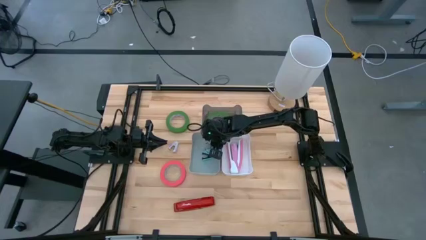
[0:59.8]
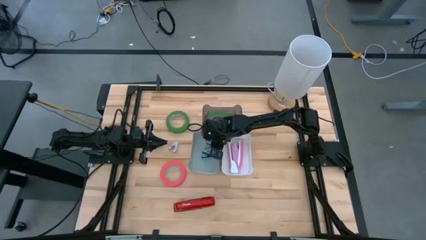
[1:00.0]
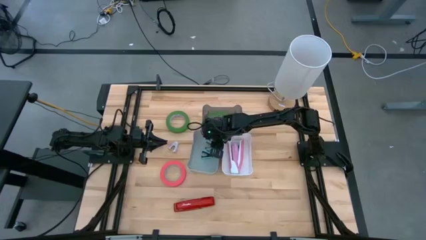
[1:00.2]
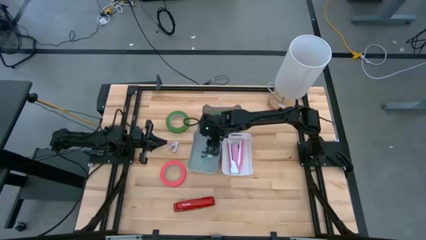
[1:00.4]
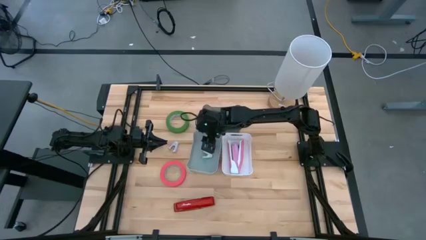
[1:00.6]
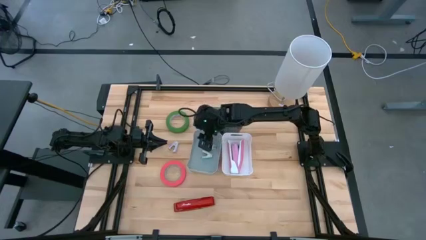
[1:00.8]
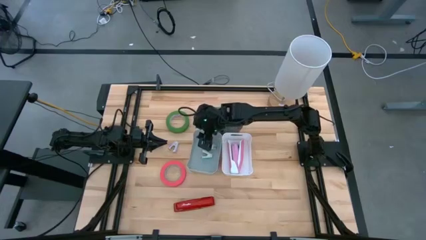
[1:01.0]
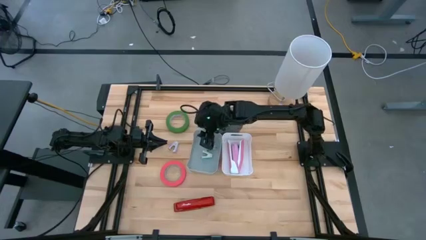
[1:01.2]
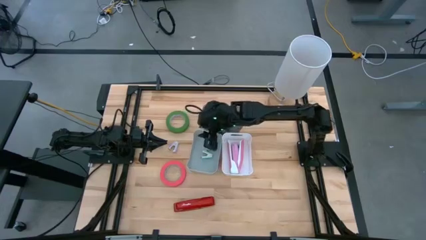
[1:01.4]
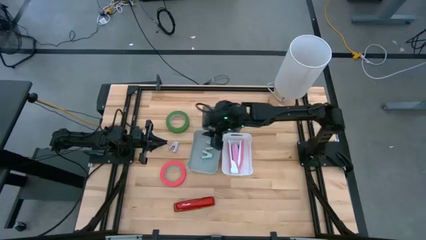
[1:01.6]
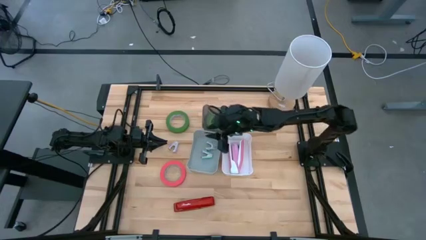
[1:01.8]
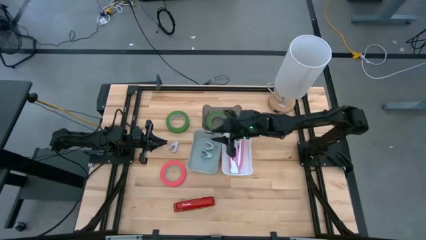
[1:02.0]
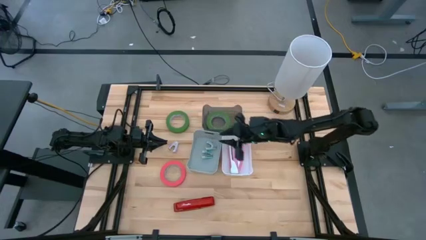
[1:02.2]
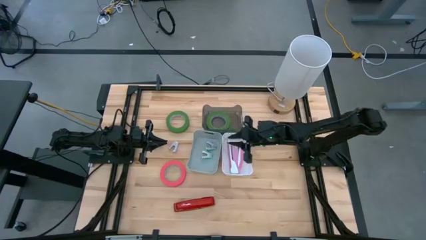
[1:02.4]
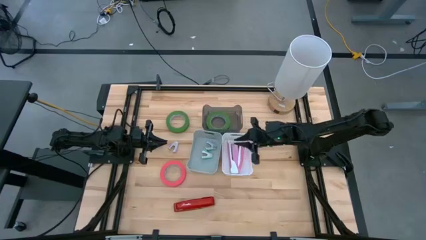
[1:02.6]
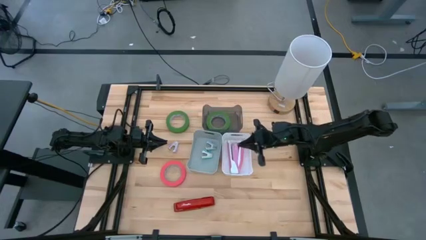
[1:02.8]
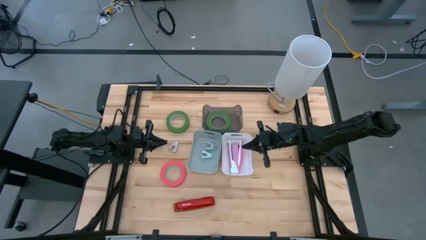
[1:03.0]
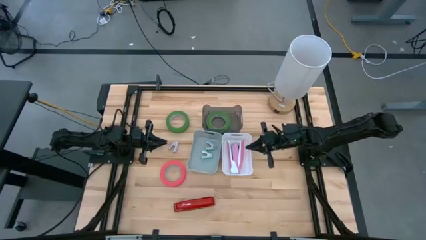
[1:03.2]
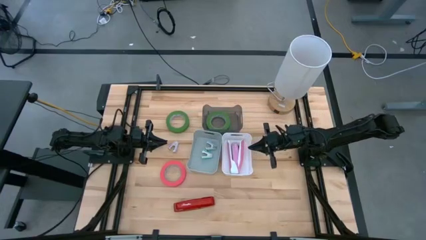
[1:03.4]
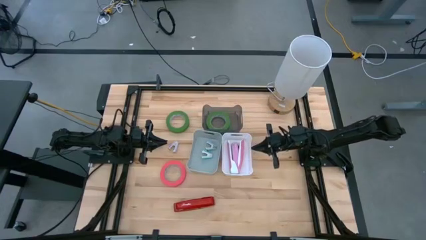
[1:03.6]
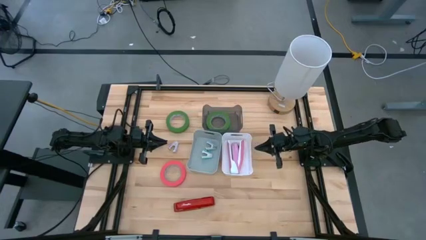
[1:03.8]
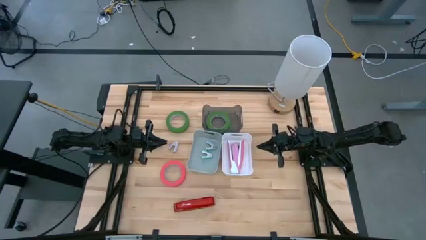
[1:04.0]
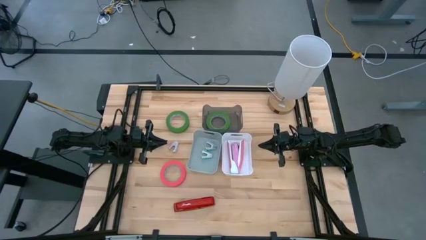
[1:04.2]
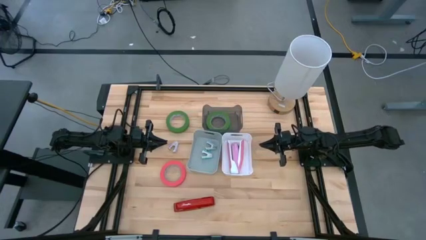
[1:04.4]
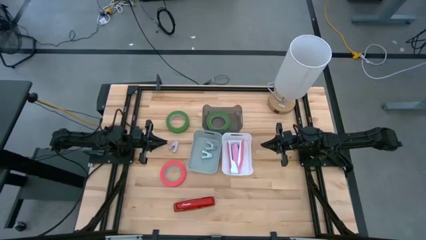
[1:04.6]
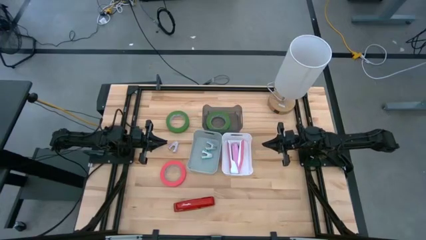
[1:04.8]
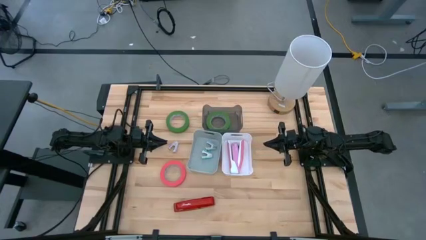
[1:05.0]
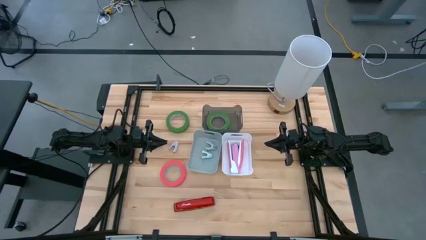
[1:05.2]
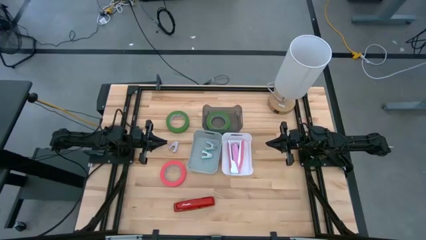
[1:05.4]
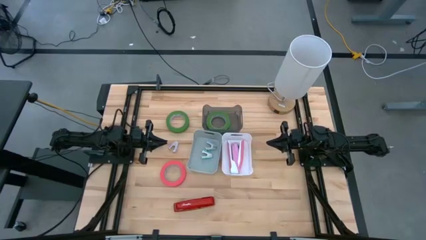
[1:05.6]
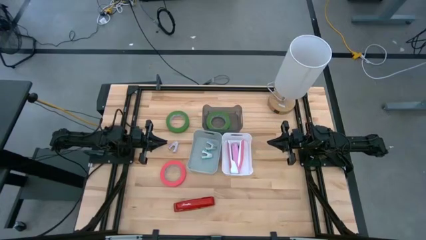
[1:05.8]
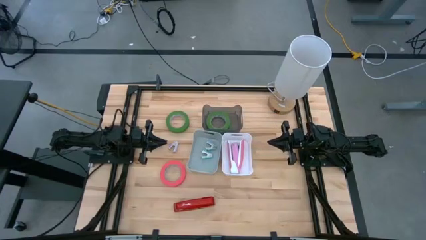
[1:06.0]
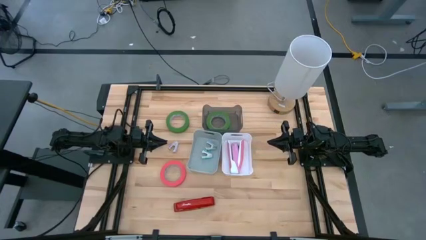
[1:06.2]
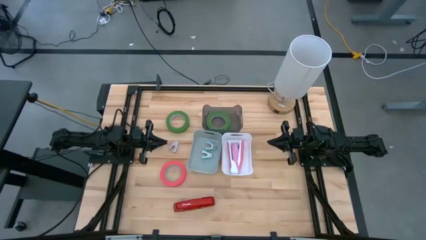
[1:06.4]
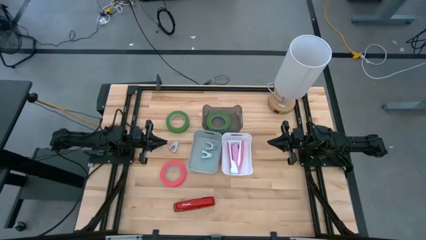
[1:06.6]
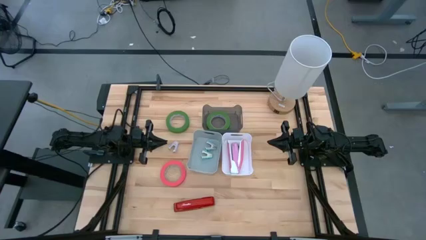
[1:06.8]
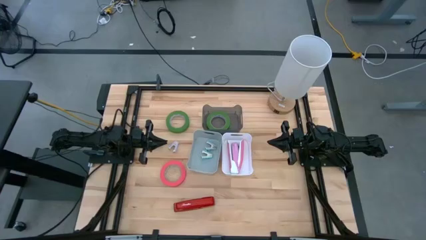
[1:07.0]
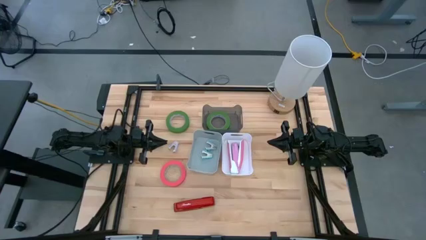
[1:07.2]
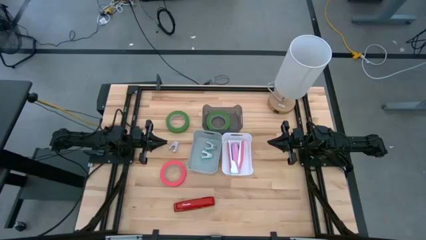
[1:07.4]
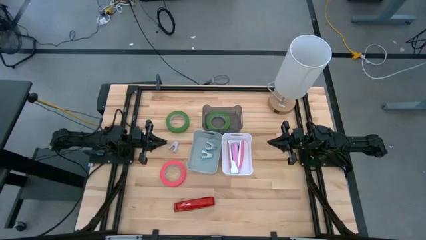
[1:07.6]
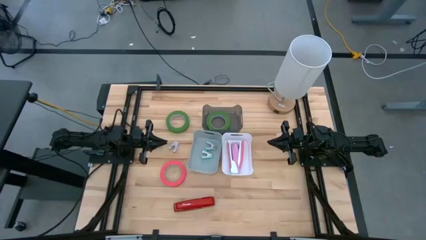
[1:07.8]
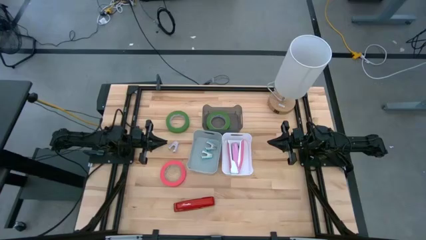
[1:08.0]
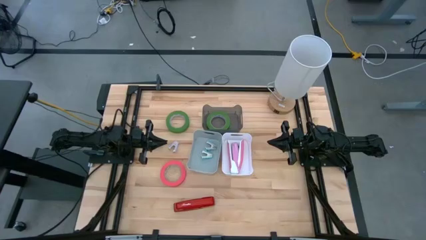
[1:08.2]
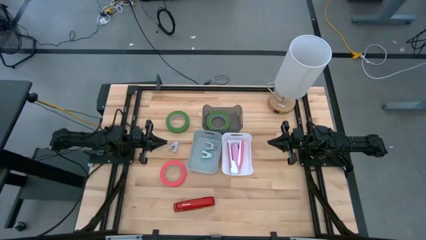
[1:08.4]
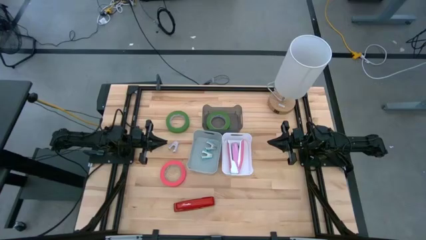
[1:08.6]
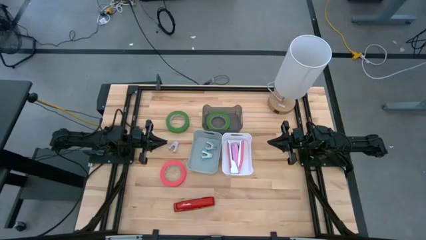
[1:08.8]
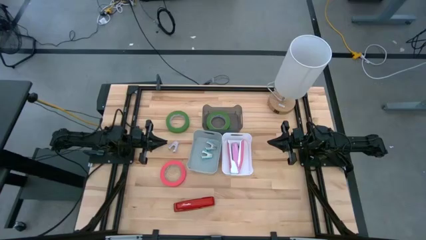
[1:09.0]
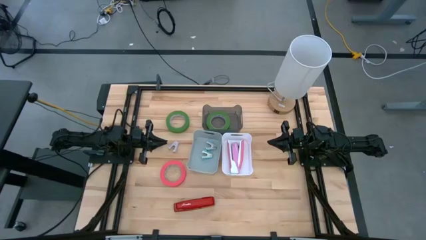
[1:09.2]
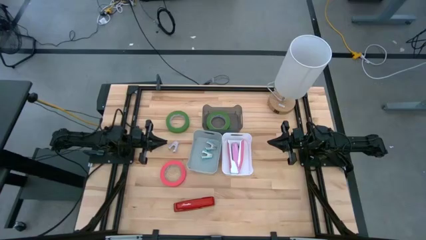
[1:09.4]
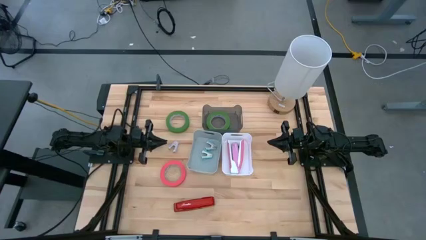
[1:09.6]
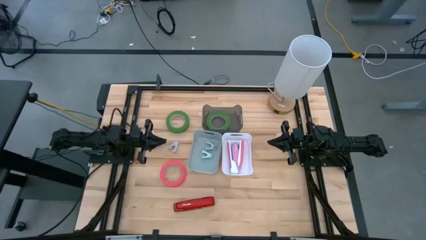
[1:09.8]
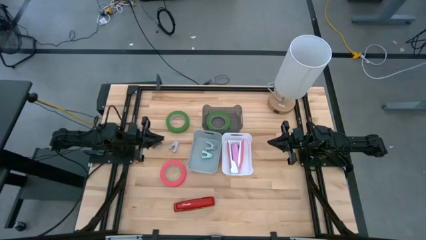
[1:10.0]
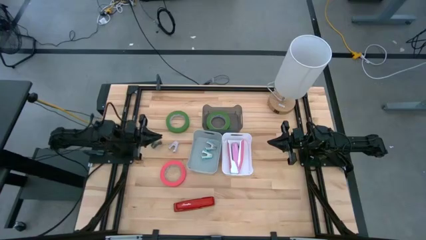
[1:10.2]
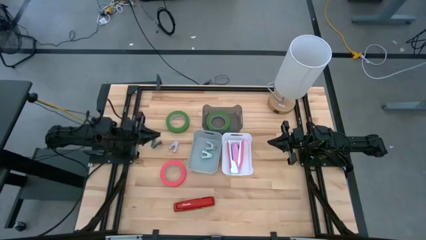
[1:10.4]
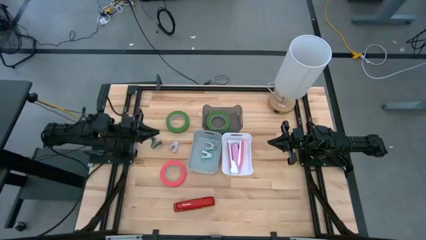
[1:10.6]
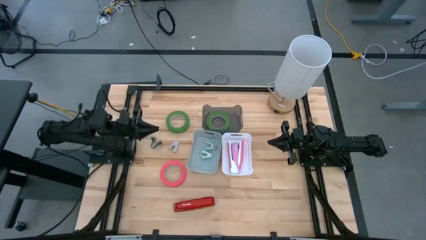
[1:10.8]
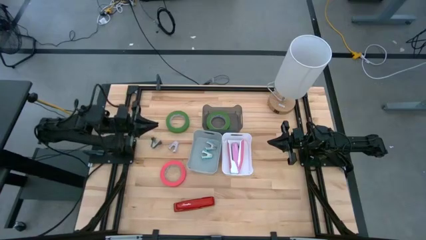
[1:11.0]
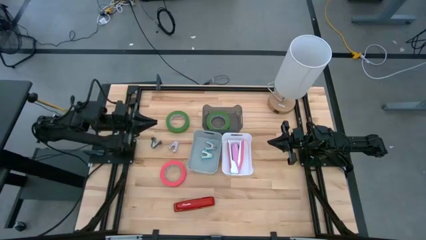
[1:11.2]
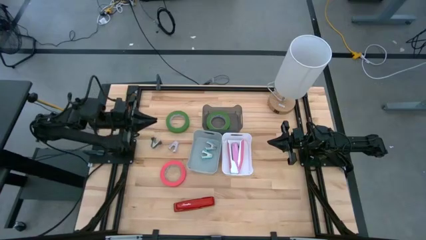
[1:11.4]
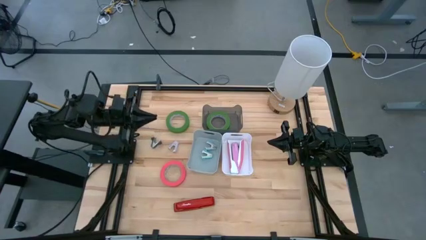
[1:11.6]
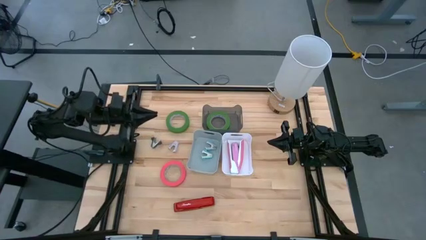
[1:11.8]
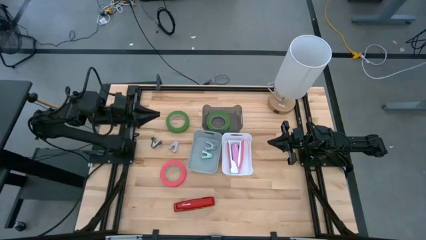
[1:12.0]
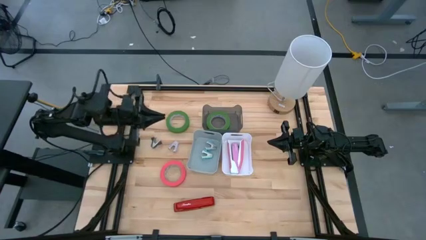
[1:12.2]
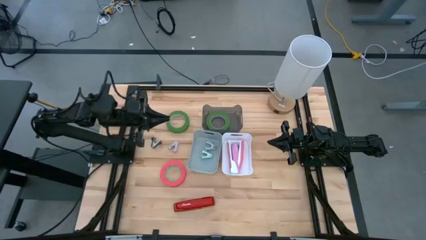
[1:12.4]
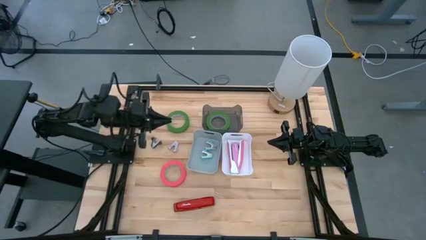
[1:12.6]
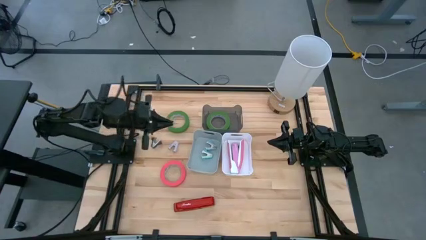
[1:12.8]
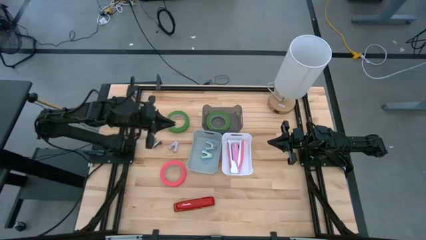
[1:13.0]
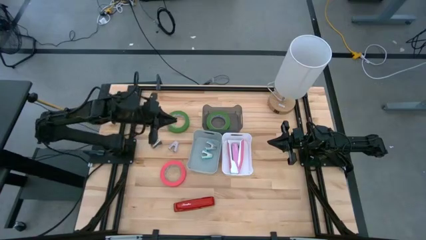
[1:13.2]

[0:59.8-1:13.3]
Task: Pick and place Stapler, Stapler remover, tape
Put the green tape in the black bin
